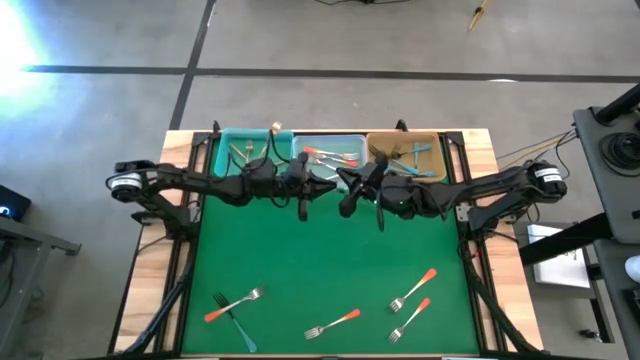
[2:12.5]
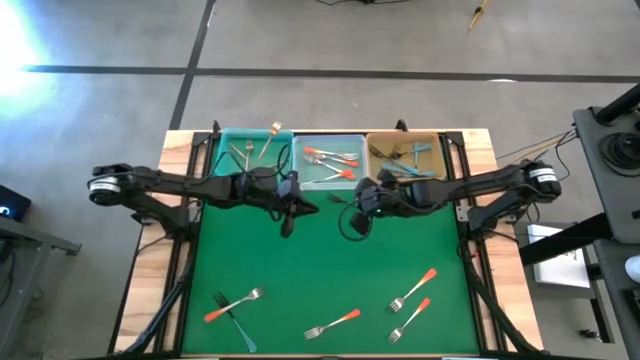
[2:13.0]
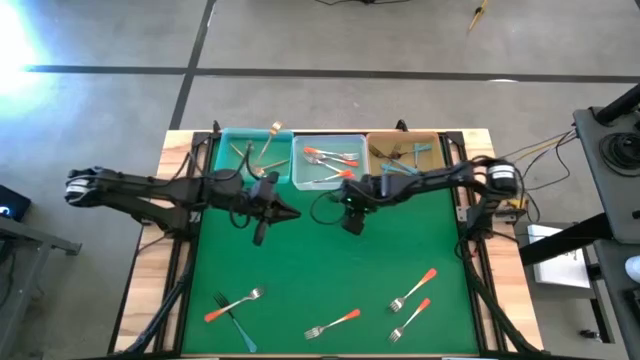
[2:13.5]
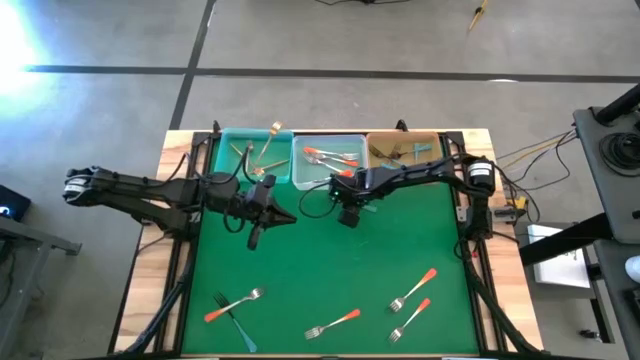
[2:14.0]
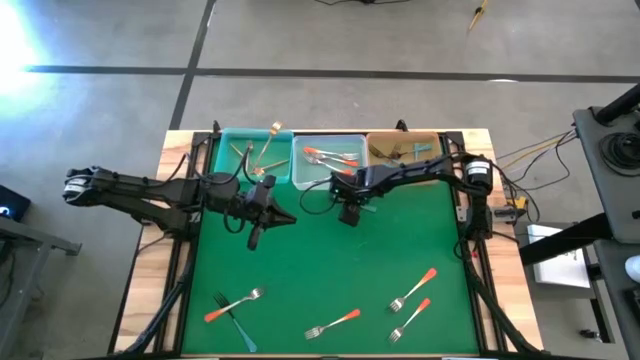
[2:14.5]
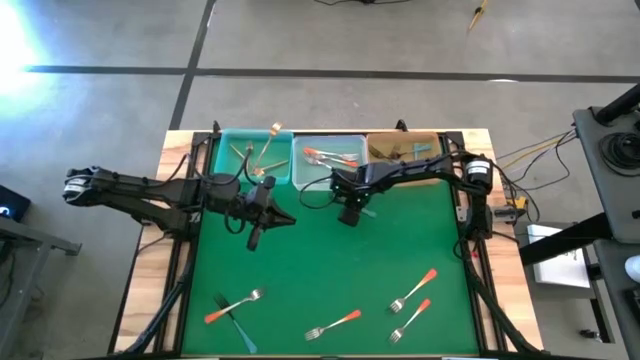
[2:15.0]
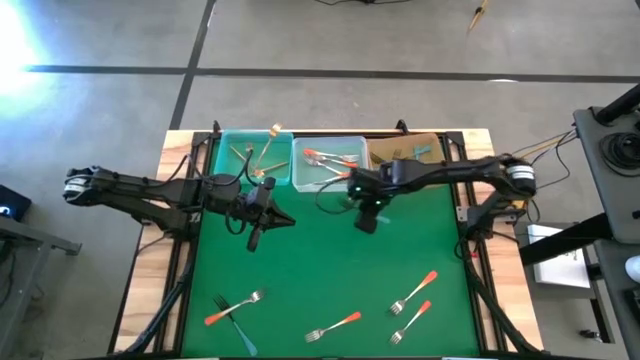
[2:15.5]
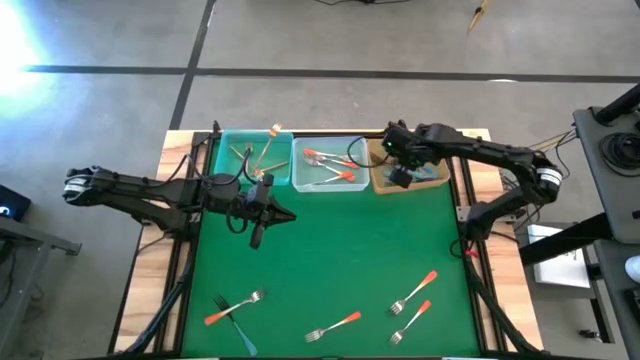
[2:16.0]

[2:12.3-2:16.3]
Task: Sort silverware by color (type)
Put the blue fork into the orange bin

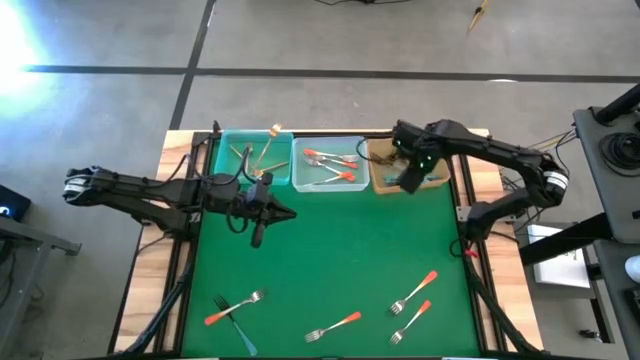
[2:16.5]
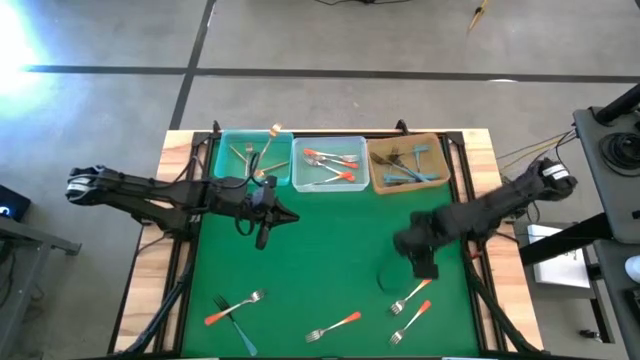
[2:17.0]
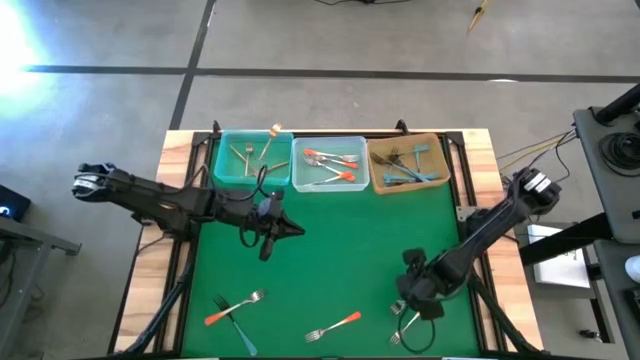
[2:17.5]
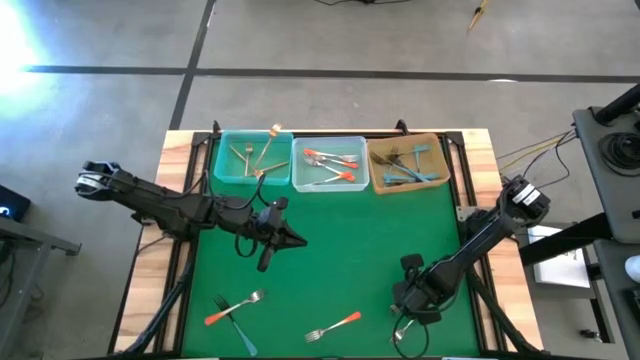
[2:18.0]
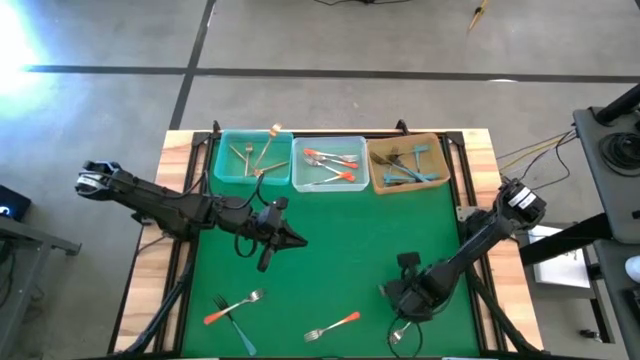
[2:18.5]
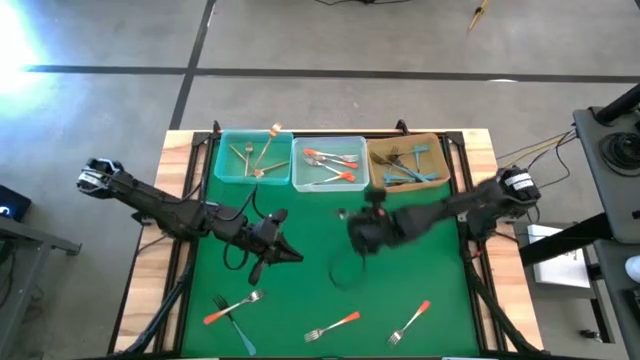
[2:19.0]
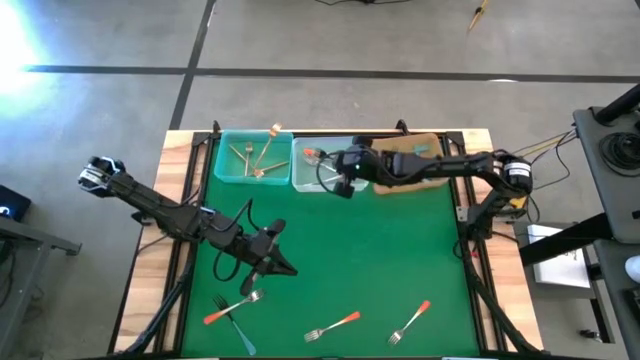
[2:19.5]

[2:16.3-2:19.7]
Put the orange fork into the white bin

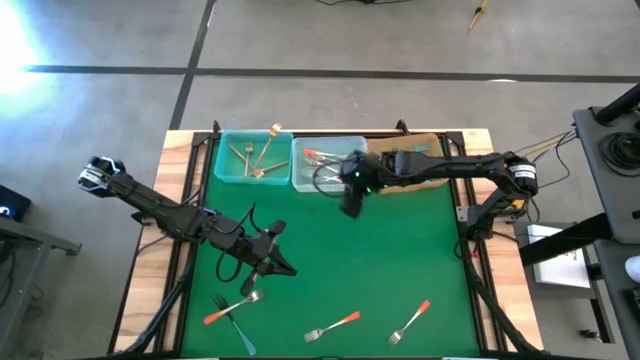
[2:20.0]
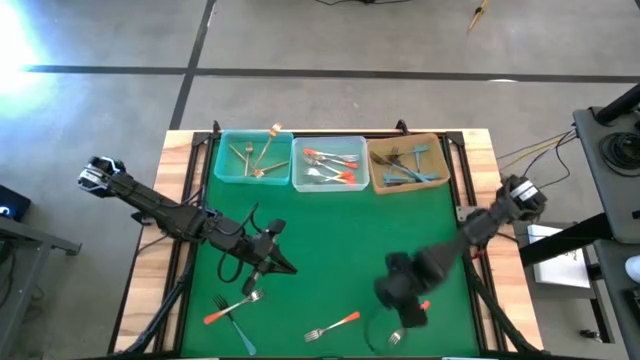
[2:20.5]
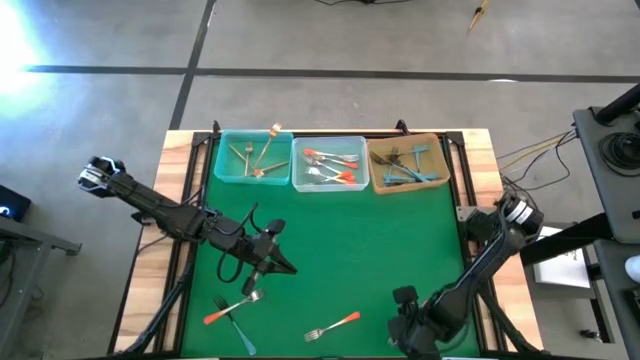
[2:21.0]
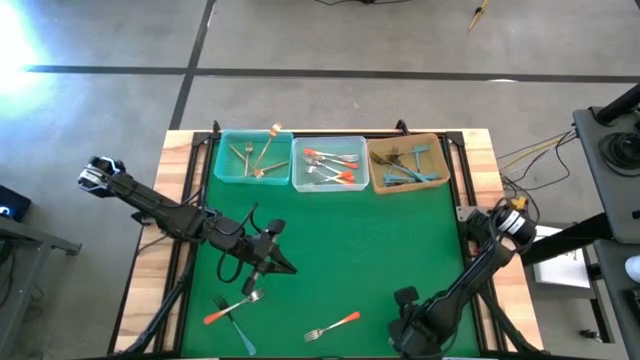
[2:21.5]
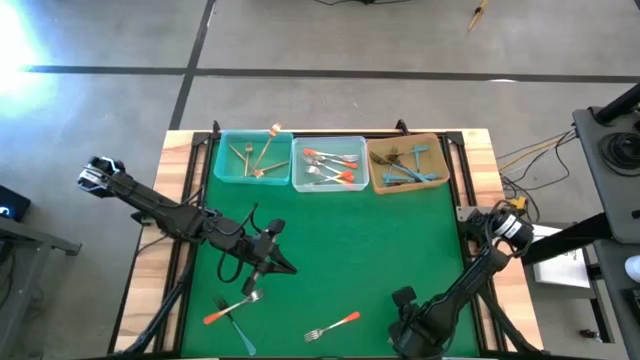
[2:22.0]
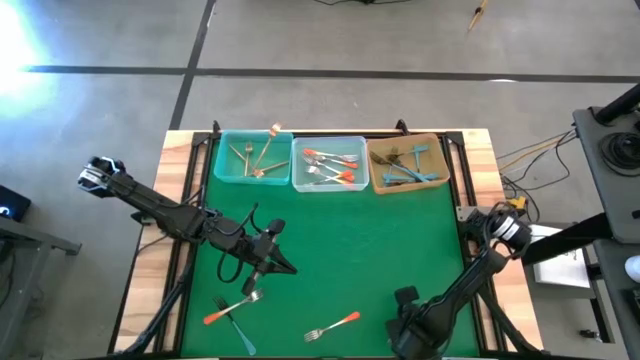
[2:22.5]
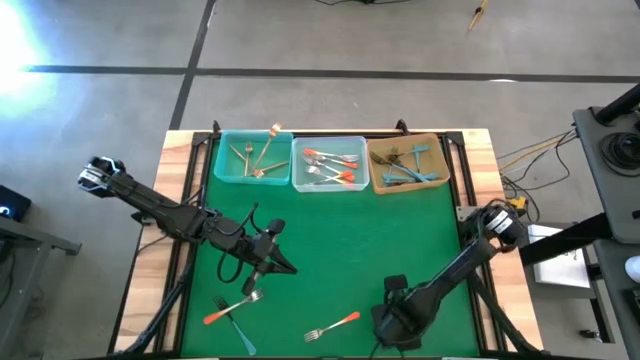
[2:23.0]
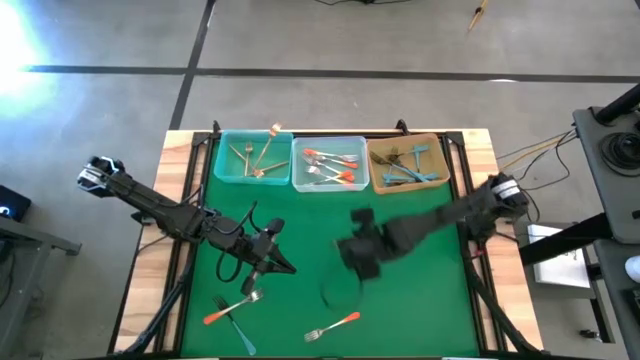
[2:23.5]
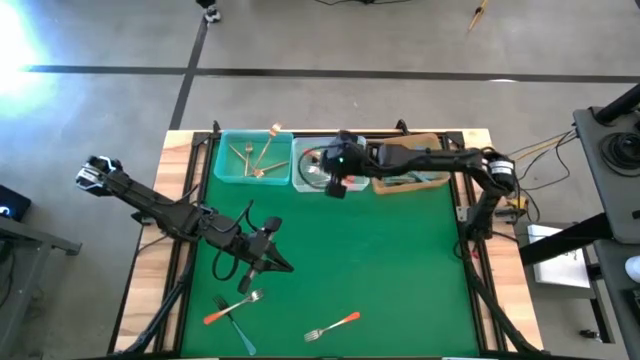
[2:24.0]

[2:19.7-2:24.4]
Put the orange fork into the white bin

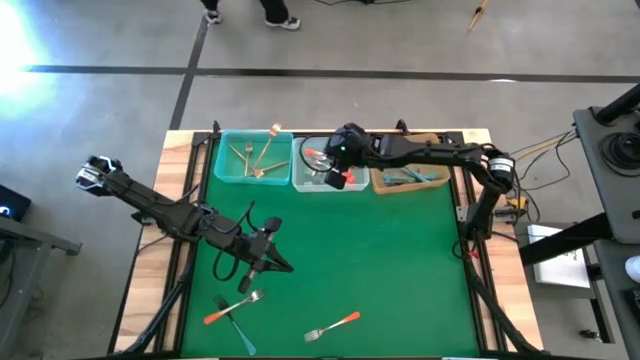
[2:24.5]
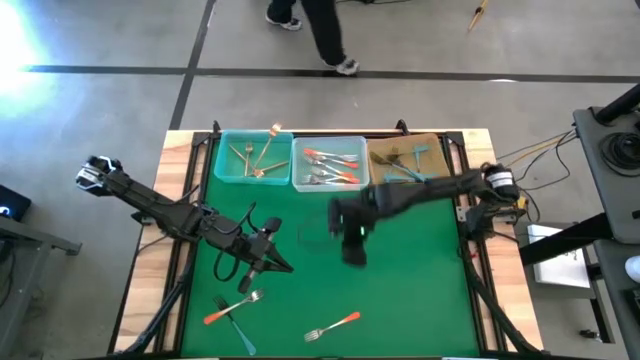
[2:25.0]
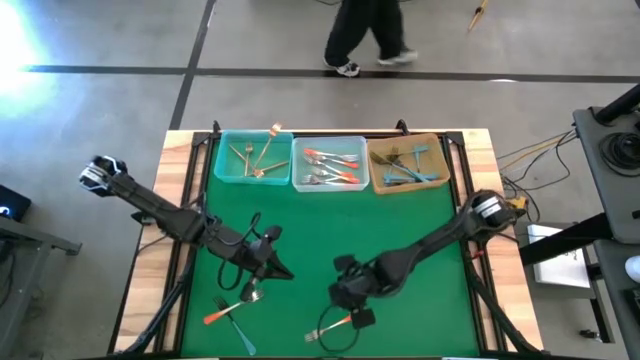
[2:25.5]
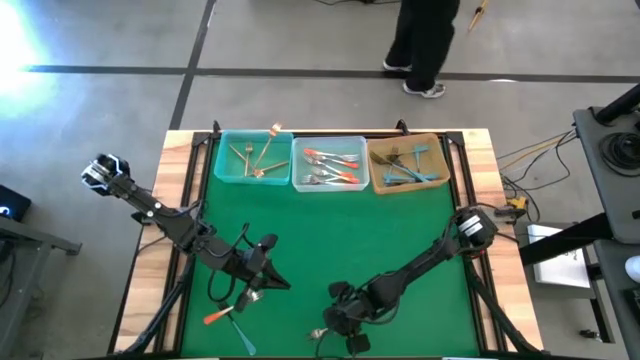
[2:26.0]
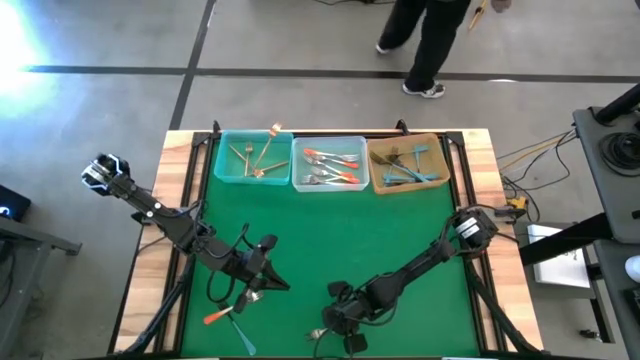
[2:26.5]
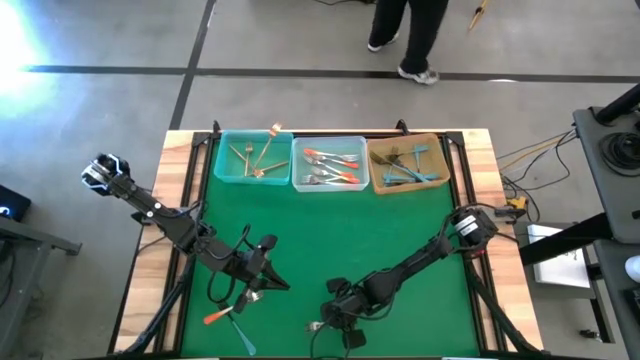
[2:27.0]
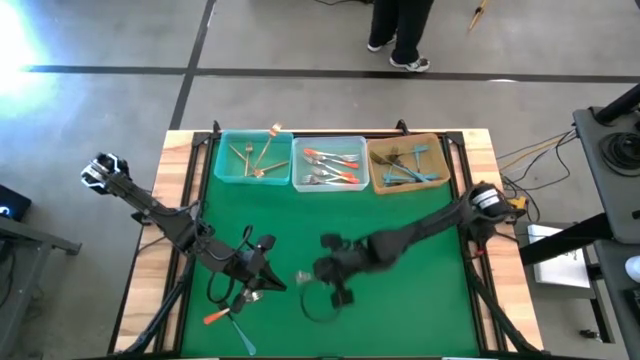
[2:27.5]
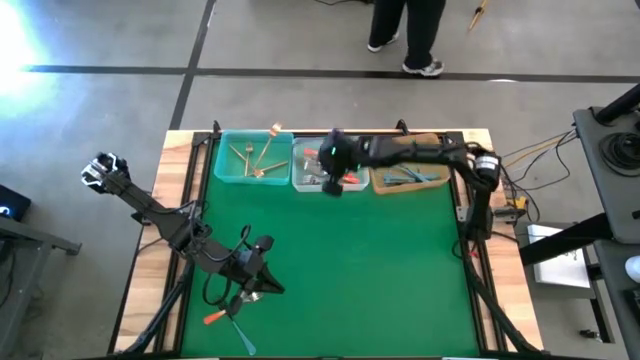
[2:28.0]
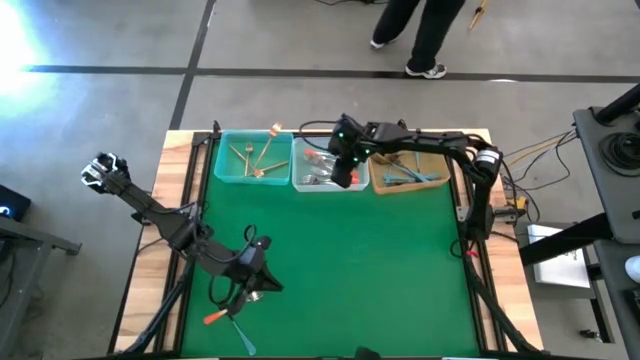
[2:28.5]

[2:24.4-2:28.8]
Put the orange fork into the white bin

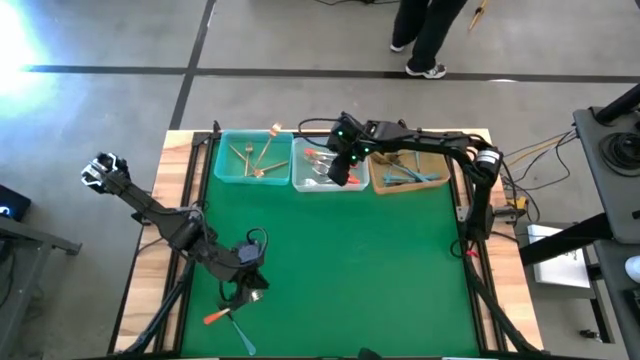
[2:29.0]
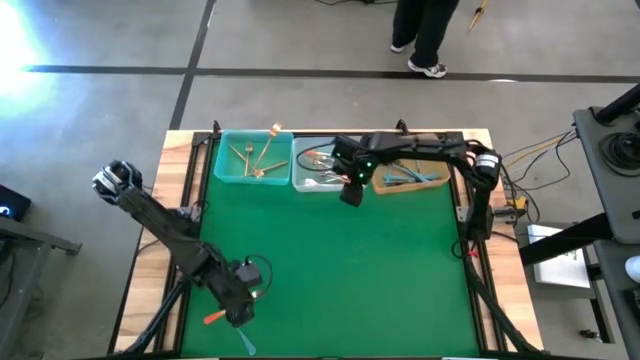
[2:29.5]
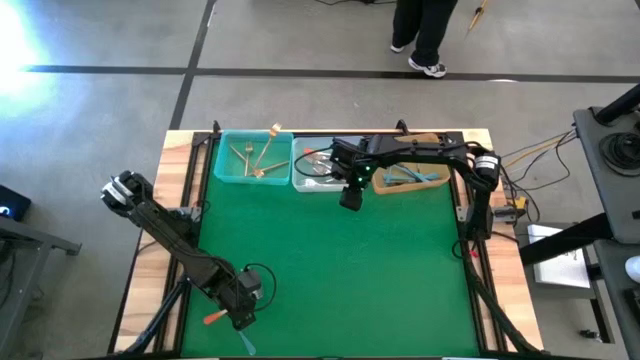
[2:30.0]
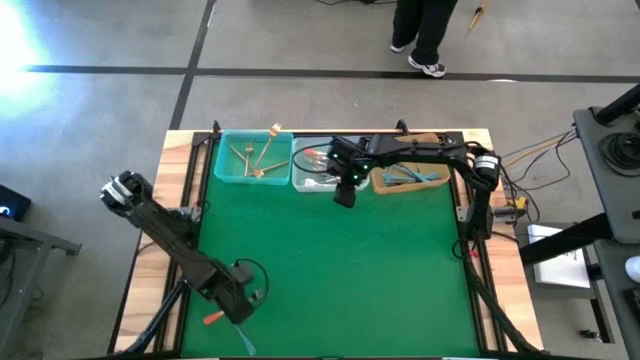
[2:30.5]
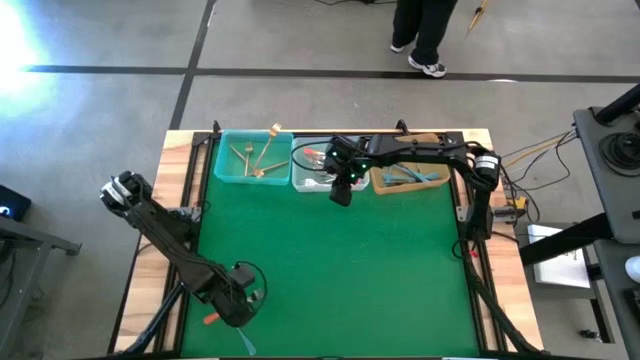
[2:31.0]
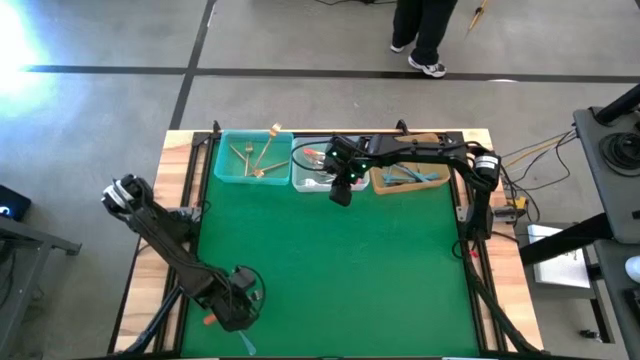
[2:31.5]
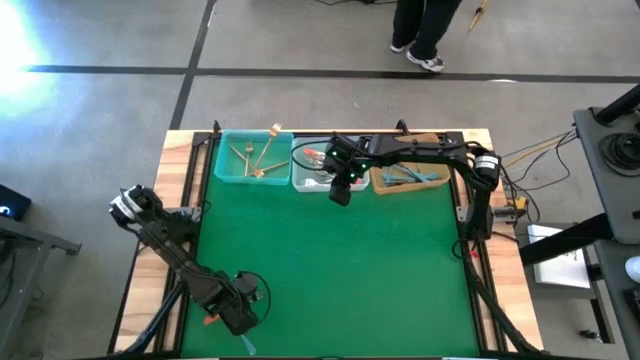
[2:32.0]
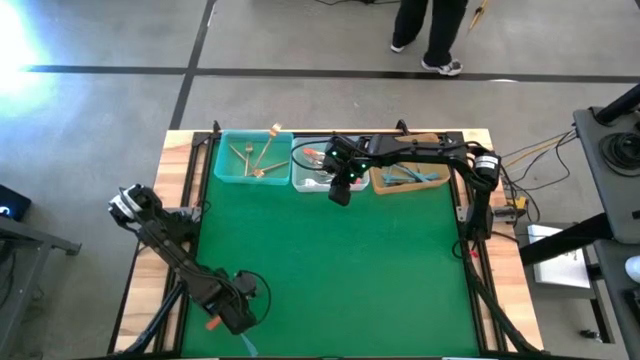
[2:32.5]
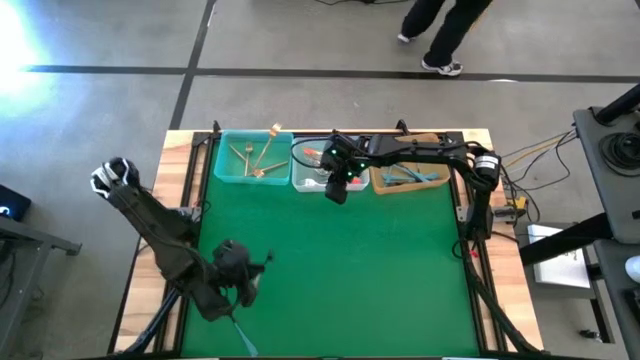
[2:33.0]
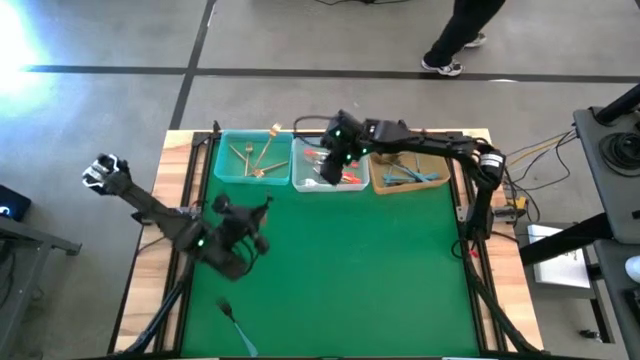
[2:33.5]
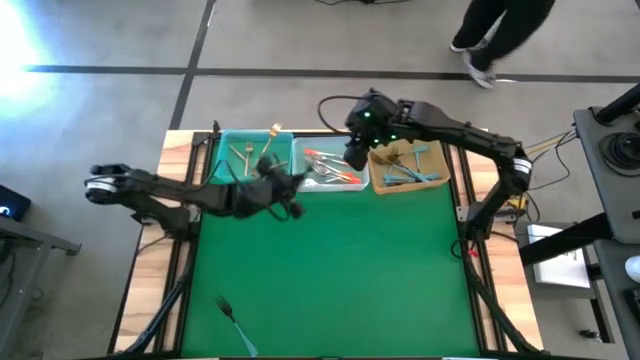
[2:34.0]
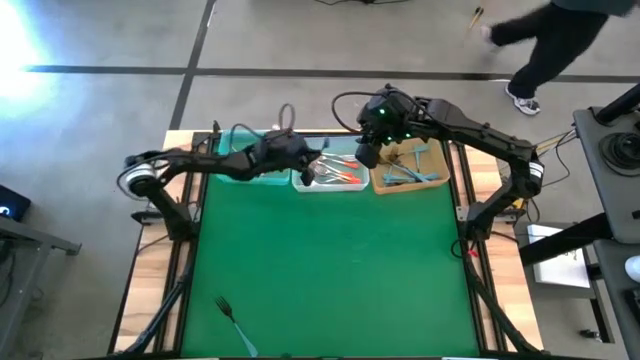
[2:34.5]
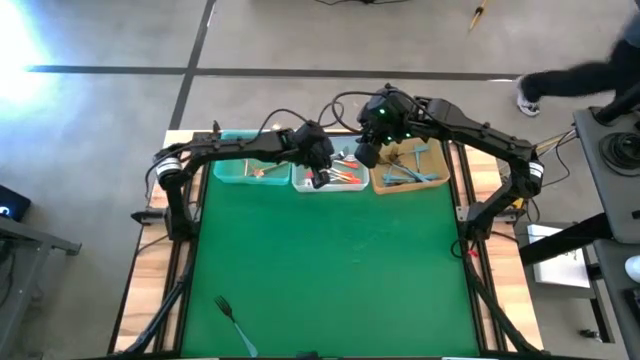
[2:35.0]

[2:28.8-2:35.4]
Put the orange fork into the white bin
